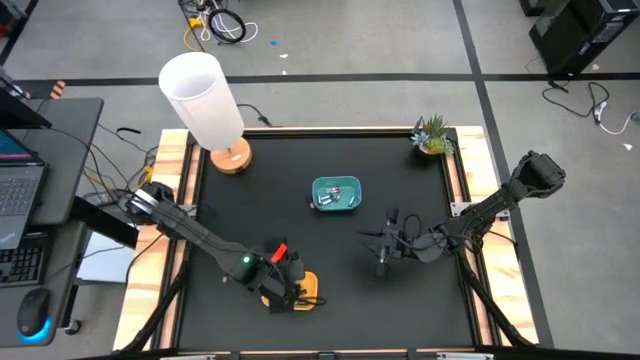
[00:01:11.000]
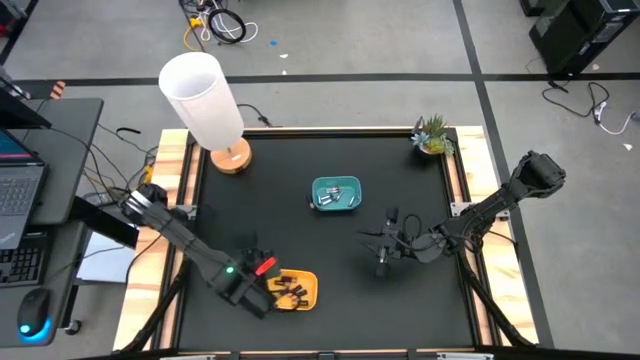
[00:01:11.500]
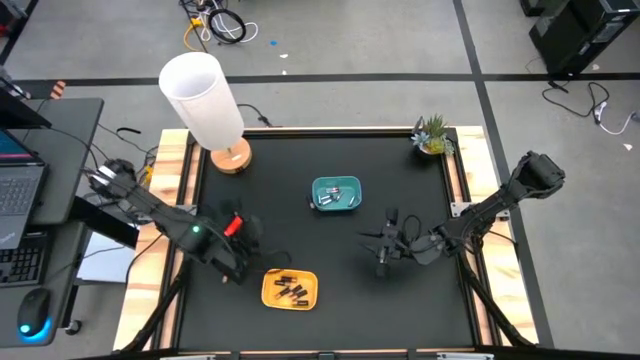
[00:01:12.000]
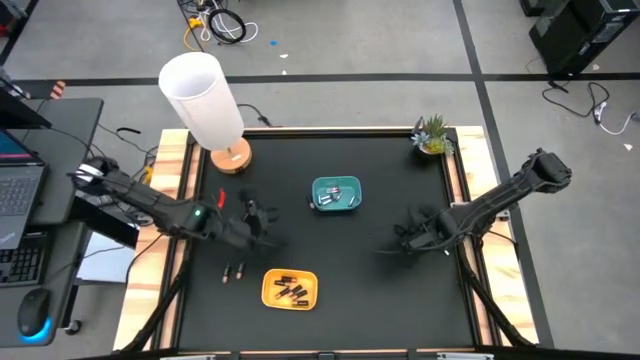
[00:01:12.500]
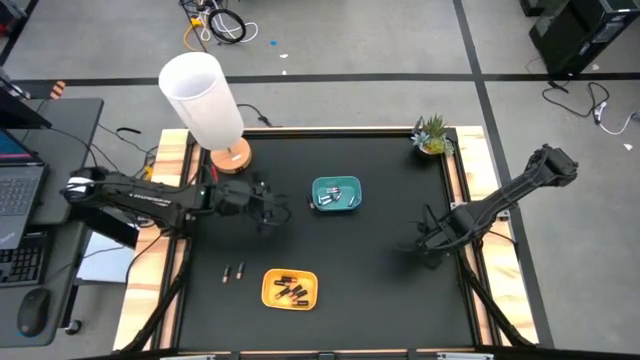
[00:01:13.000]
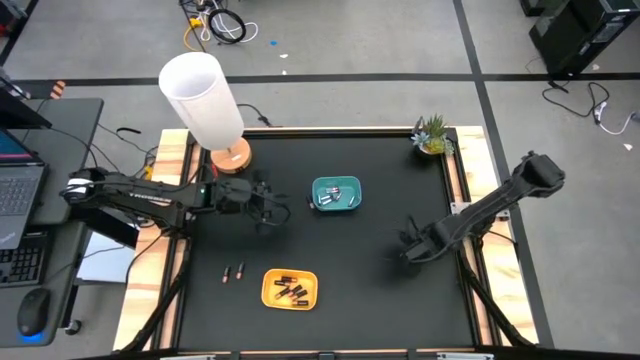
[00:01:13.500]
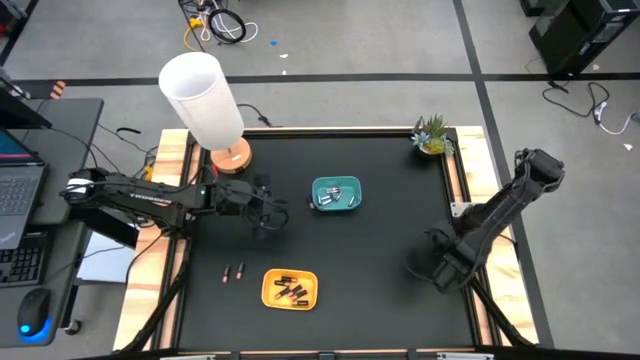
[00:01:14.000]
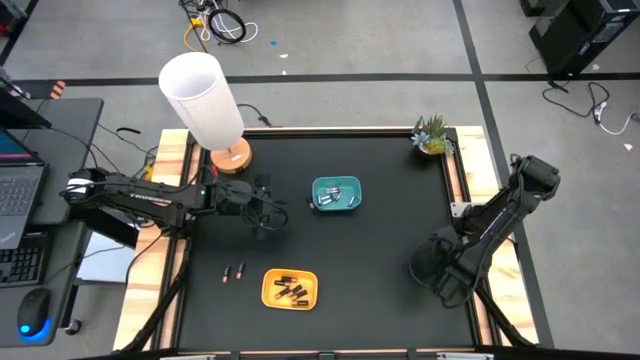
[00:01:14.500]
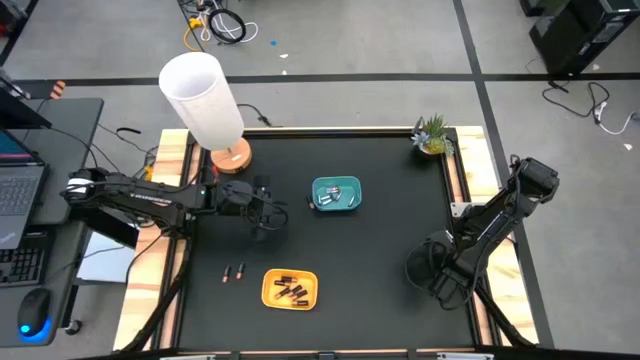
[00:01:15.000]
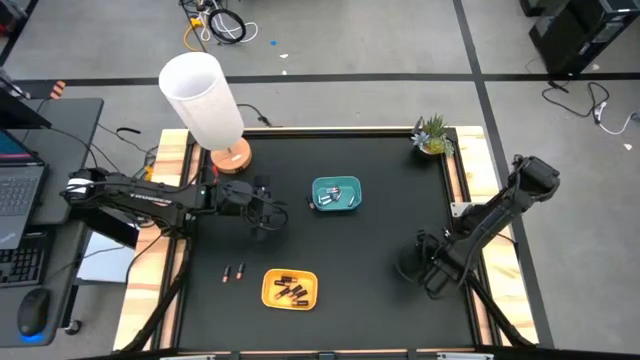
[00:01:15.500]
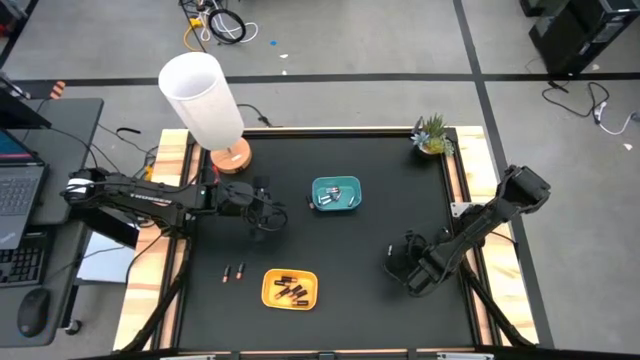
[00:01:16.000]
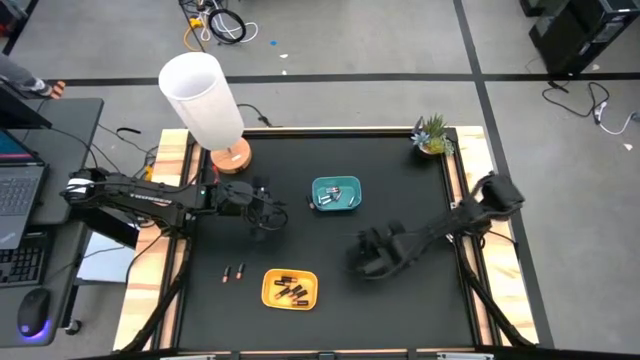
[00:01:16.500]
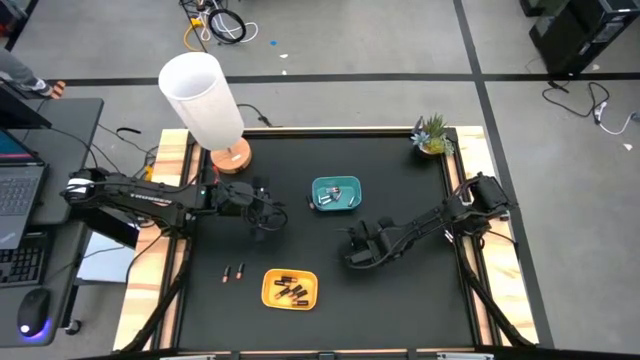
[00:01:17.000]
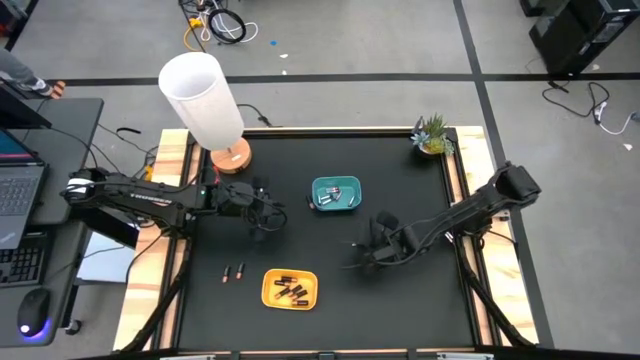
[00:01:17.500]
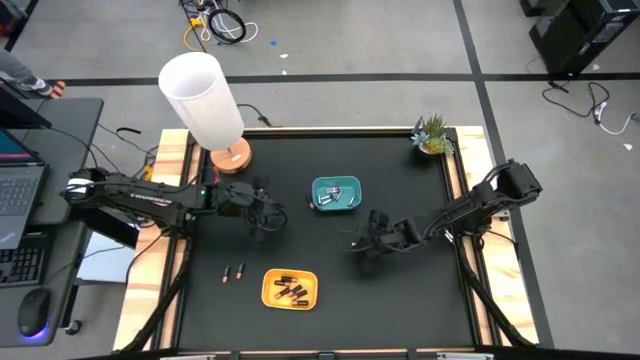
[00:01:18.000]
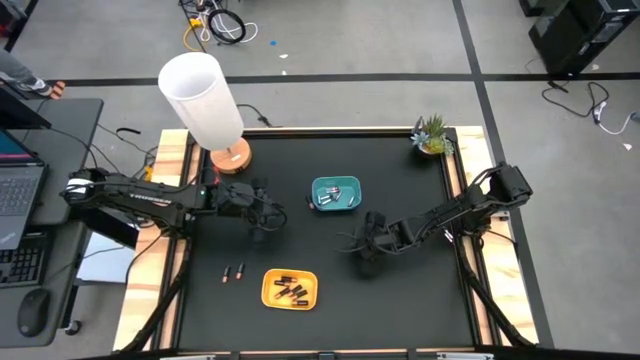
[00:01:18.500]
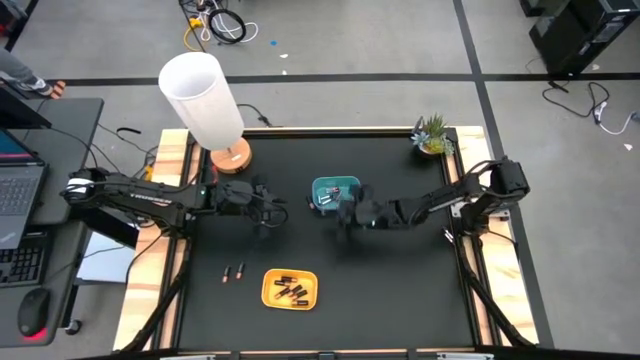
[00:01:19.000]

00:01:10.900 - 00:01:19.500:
Task: Sort batteries
Put the silver battery into the blue bin

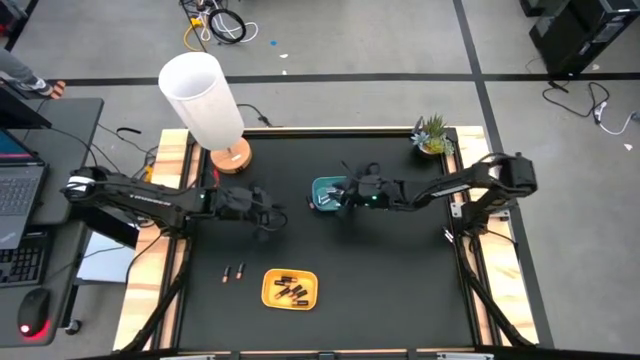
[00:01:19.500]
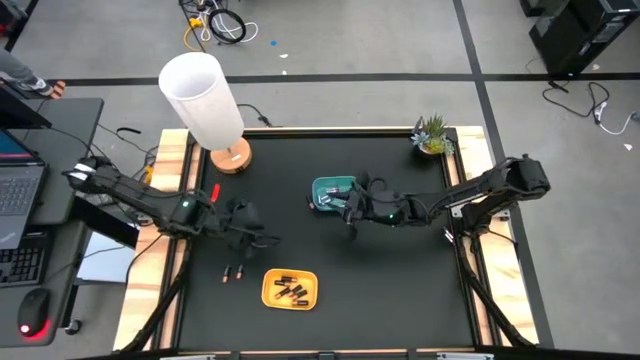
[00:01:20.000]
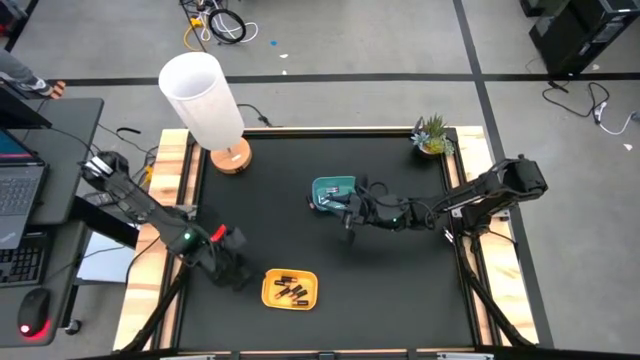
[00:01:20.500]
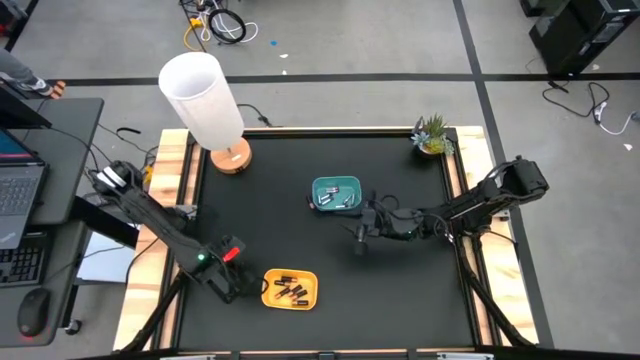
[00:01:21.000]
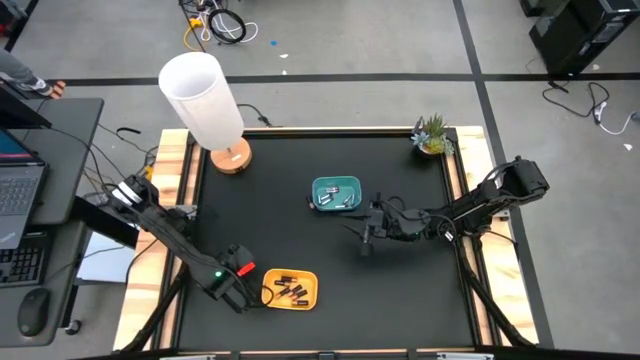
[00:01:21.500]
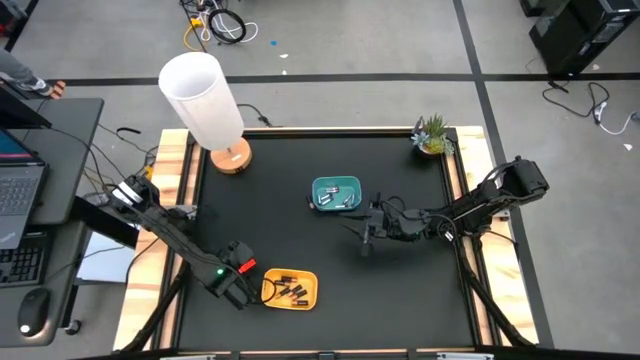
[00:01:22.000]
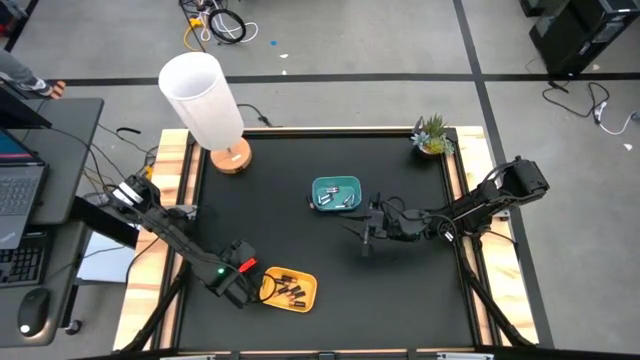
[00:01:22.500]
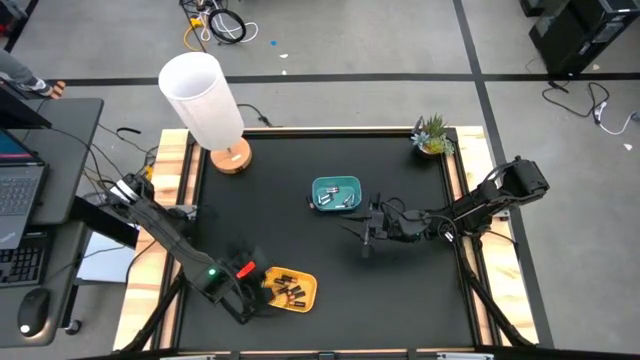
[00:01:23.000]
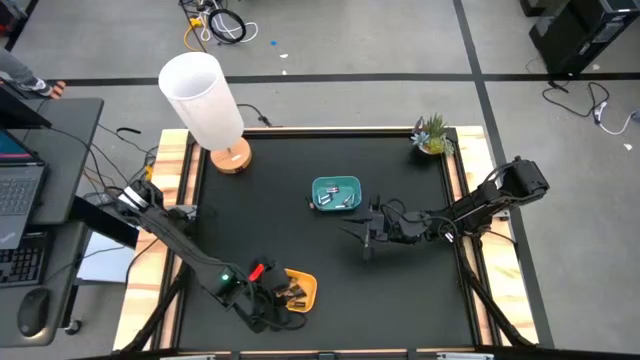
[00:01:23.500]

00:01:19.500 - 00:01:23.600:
Put the black battery into the yellow bin

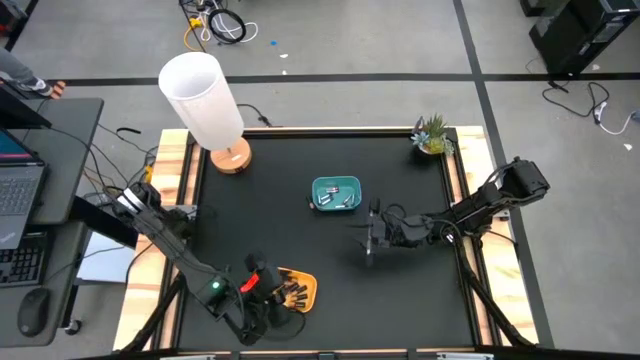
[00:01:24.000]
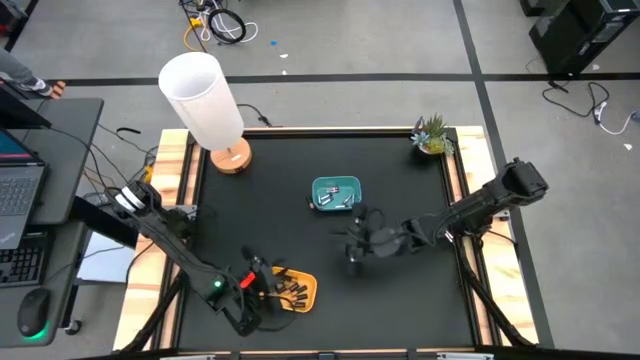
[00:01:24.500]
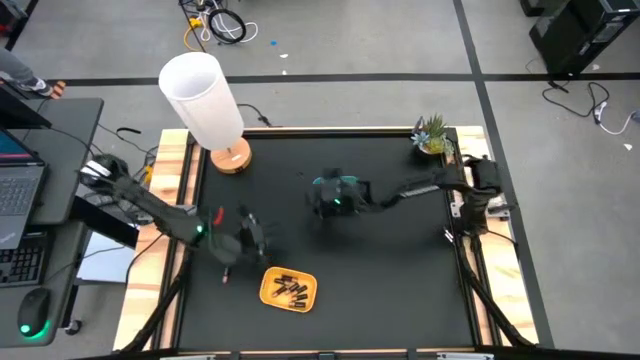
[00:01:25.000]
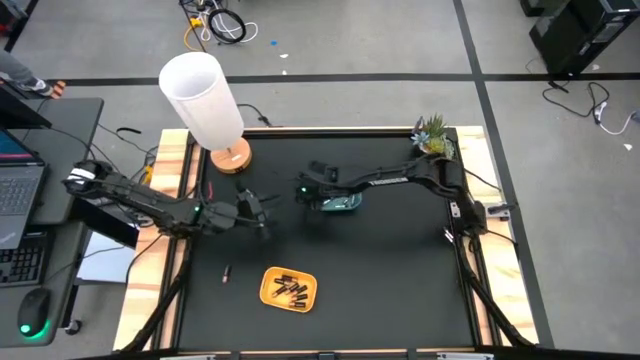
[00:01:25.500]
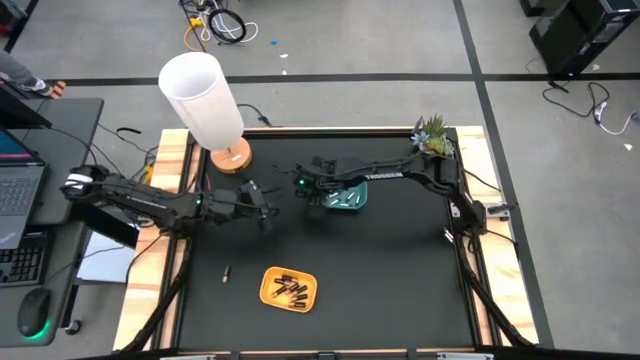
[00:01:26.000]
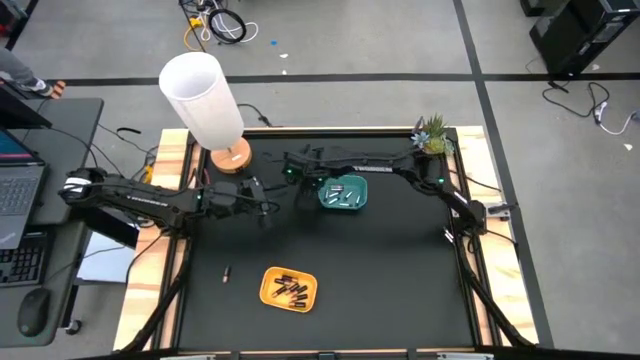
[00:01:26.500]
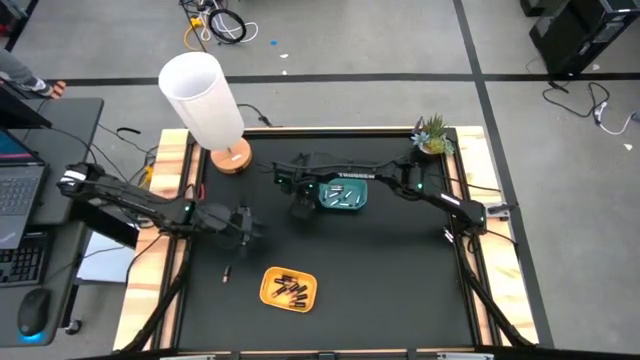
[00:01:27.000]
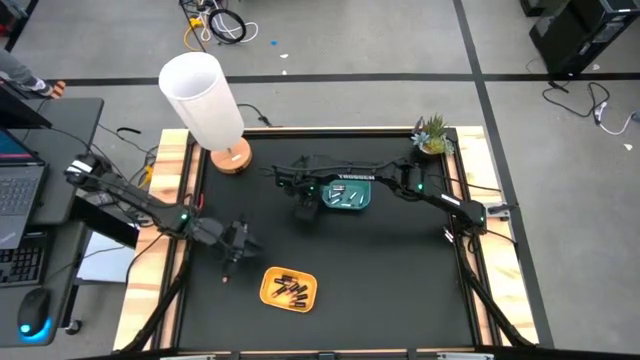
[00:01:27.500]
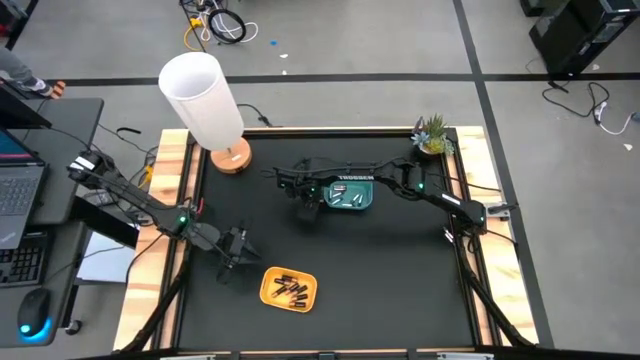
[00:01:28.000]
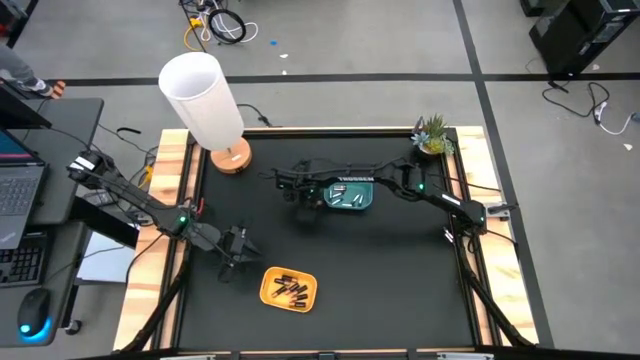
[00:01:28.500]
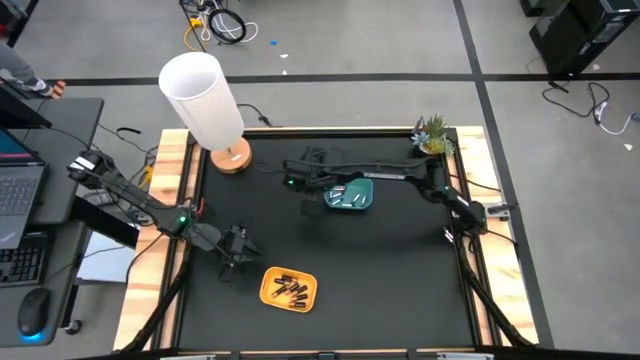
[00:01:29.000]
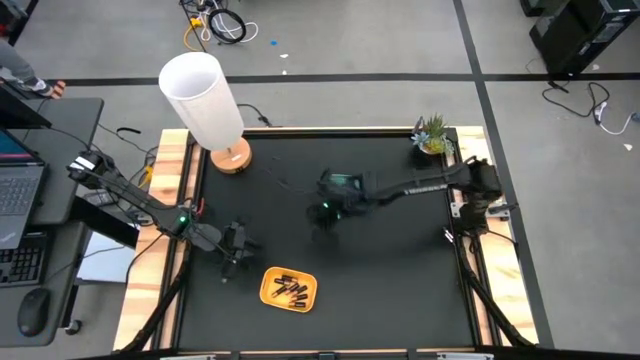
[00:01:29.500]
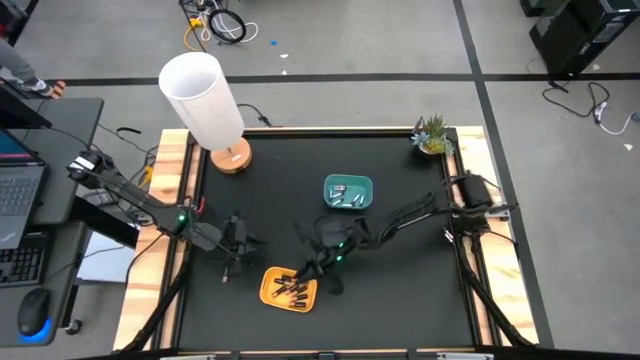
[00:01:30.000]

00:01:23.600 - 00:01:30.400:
Put the black battery into the yellow bin

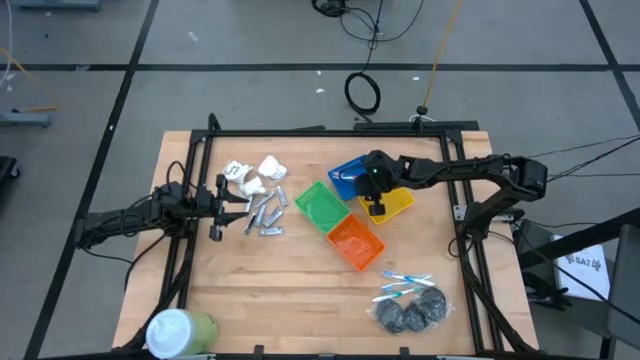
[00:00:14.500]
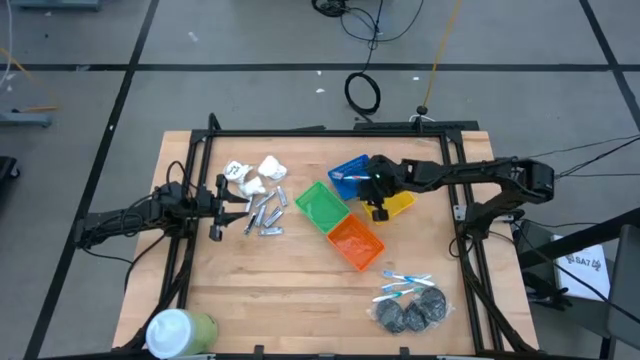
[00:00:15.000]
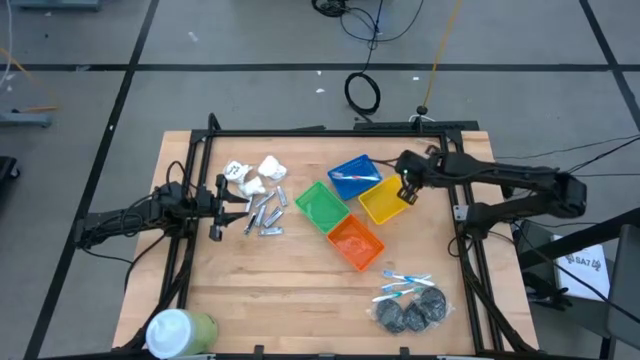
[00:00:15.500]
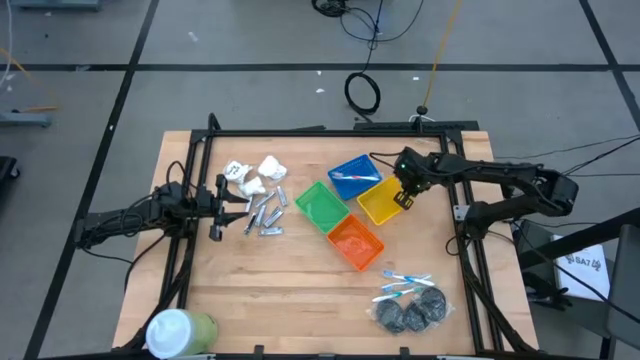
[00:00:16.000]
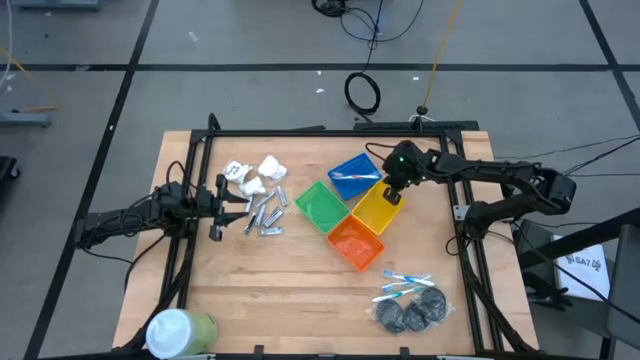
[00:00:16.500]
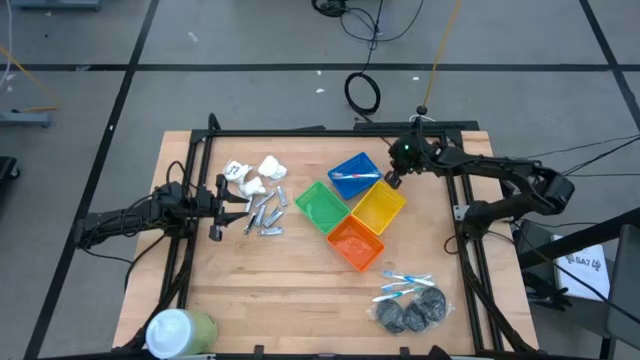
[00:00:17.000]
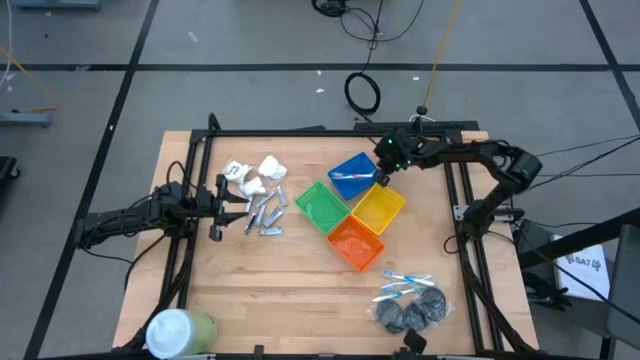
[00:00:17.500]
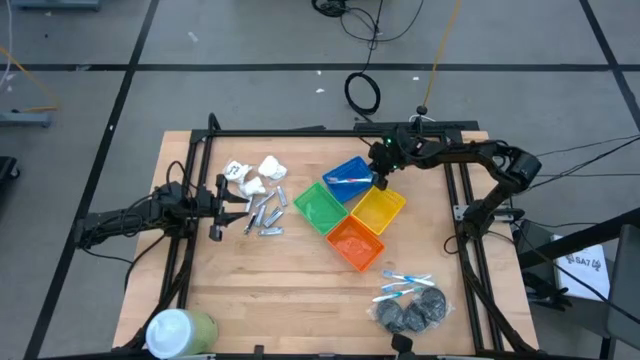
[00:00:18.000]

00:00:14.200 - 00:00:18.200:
Task: Pick & Place Travel size toiletries
Adjust the bins
